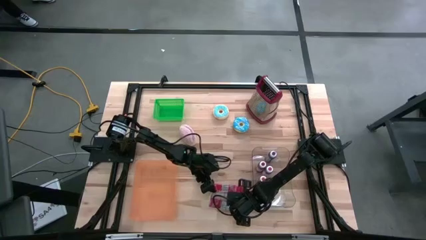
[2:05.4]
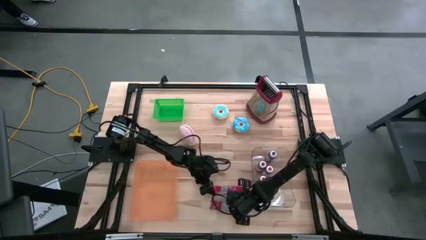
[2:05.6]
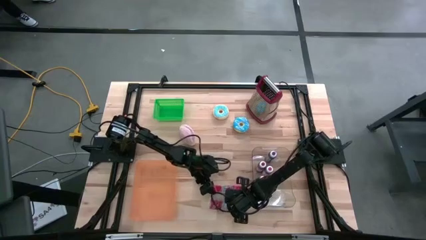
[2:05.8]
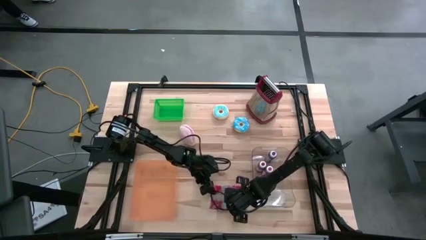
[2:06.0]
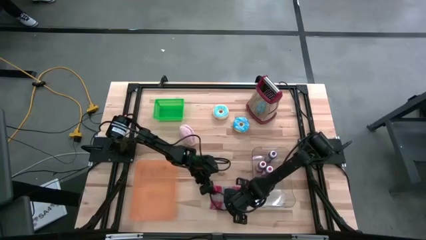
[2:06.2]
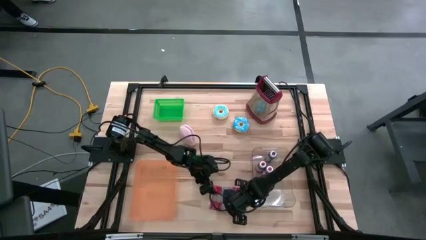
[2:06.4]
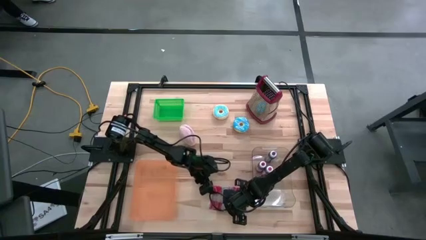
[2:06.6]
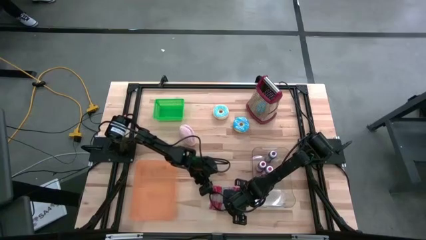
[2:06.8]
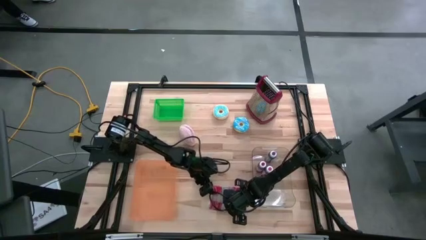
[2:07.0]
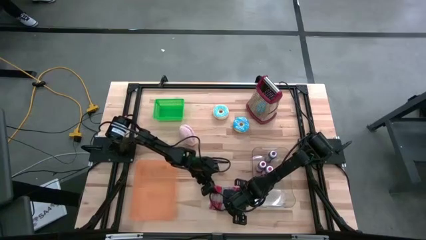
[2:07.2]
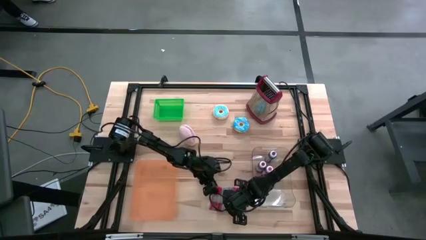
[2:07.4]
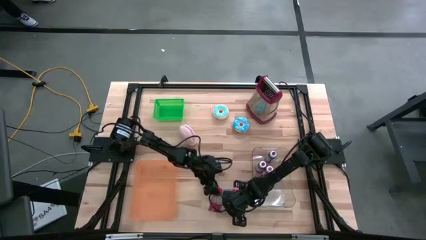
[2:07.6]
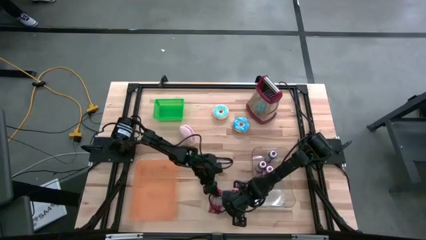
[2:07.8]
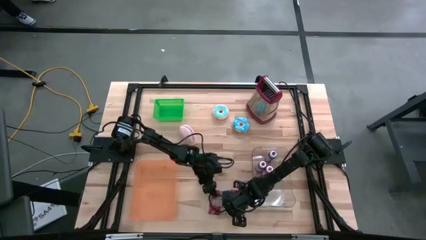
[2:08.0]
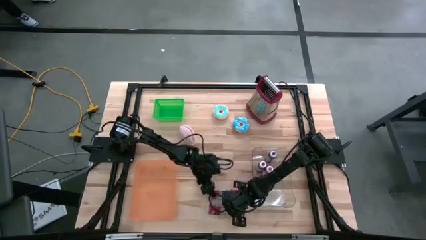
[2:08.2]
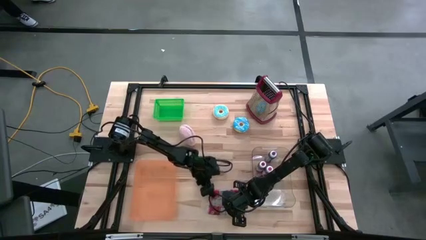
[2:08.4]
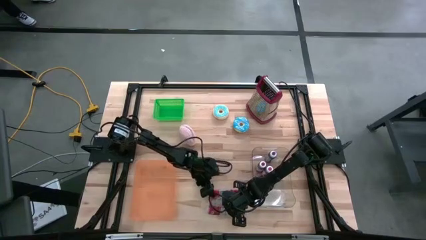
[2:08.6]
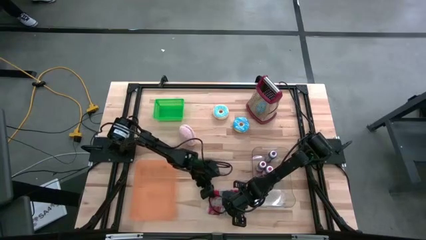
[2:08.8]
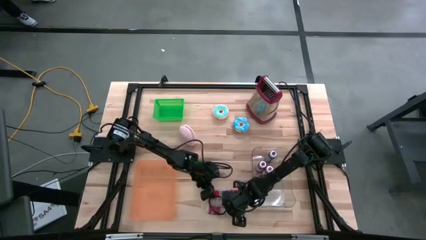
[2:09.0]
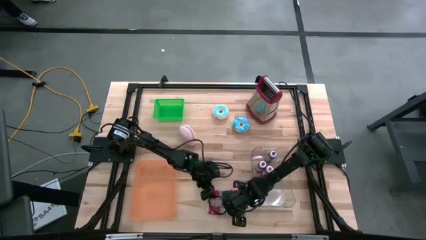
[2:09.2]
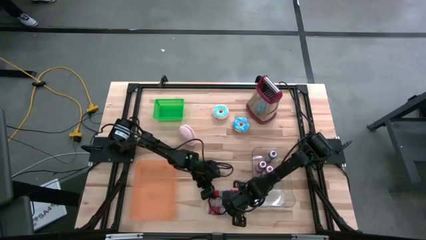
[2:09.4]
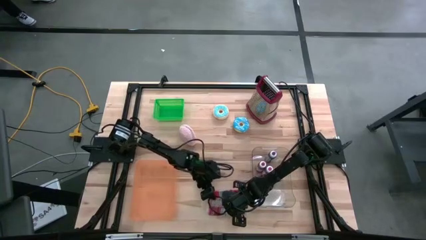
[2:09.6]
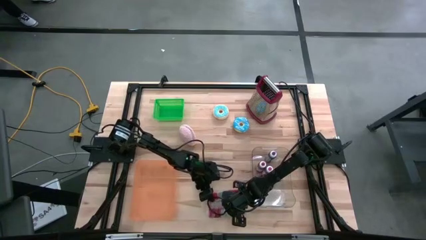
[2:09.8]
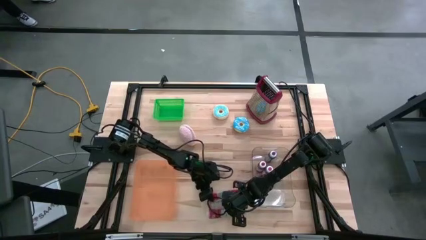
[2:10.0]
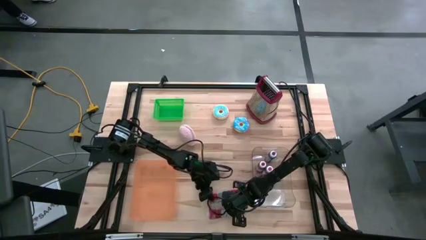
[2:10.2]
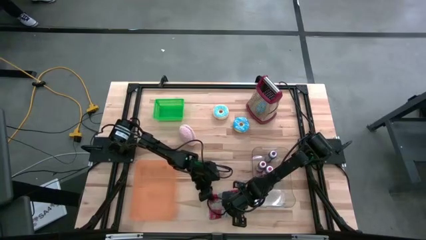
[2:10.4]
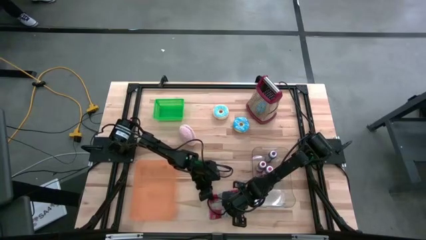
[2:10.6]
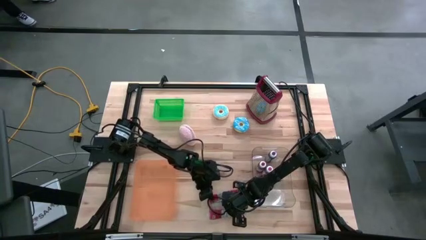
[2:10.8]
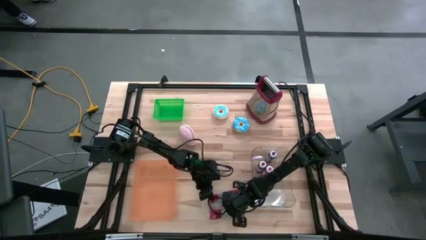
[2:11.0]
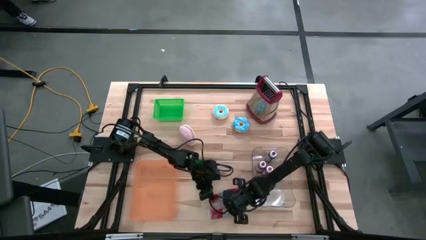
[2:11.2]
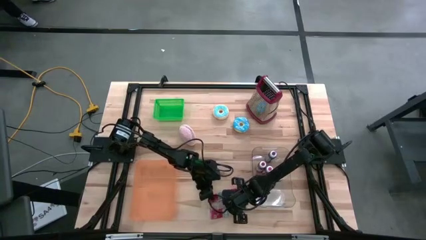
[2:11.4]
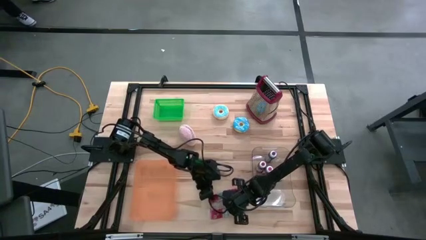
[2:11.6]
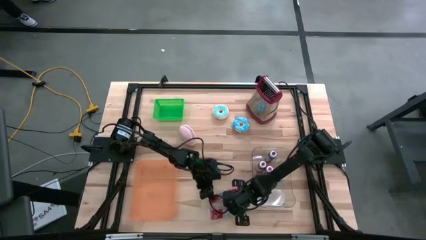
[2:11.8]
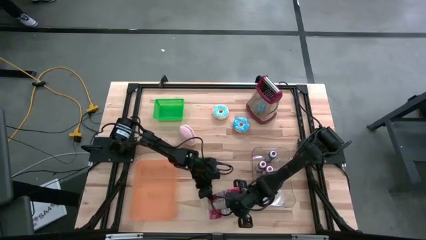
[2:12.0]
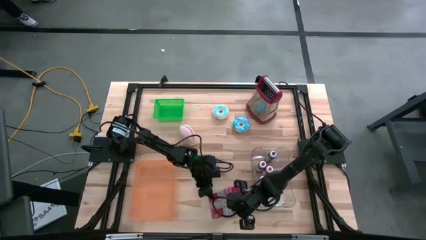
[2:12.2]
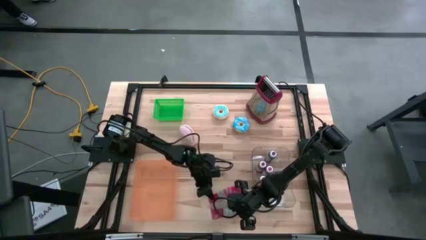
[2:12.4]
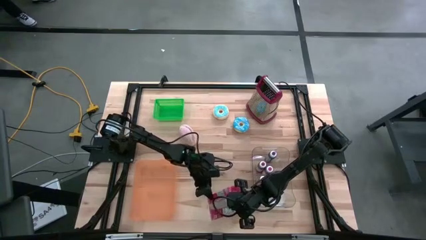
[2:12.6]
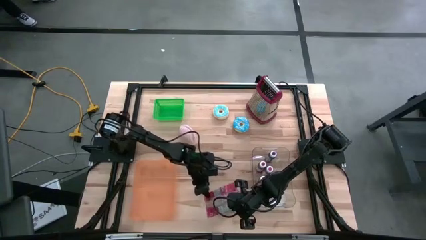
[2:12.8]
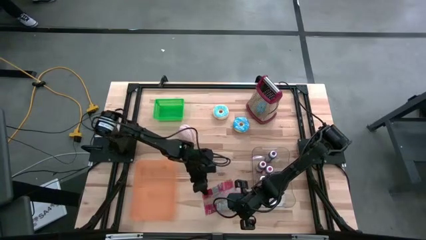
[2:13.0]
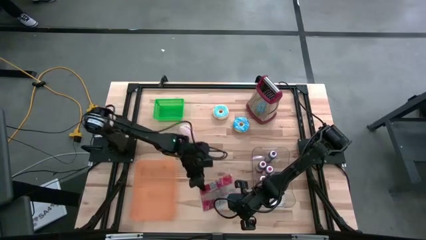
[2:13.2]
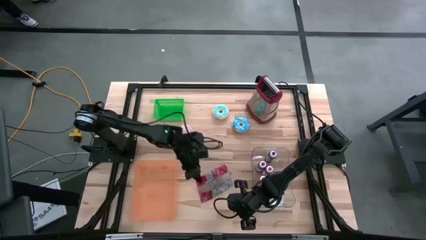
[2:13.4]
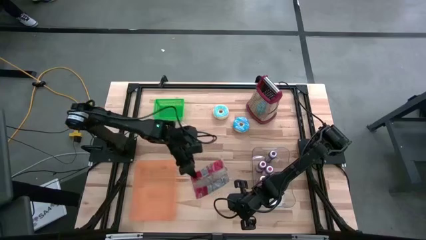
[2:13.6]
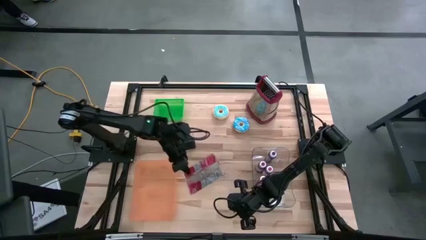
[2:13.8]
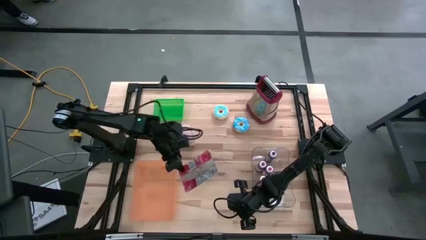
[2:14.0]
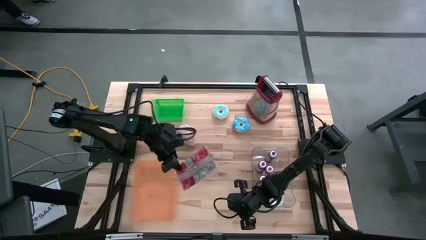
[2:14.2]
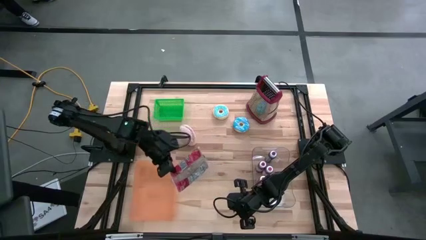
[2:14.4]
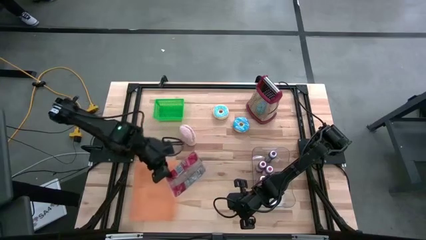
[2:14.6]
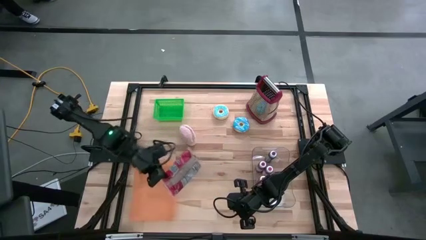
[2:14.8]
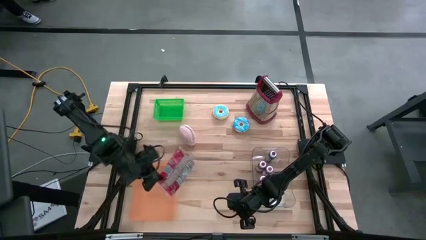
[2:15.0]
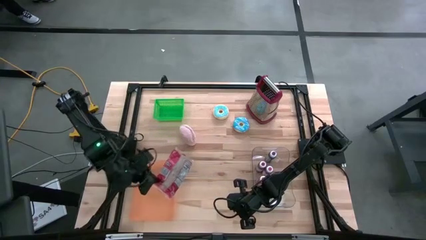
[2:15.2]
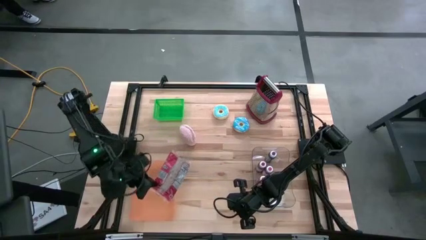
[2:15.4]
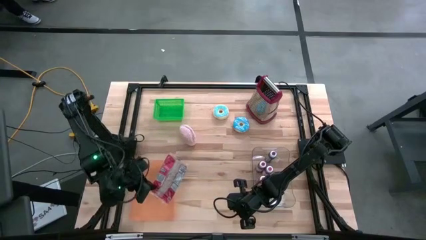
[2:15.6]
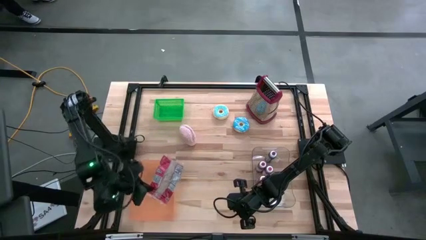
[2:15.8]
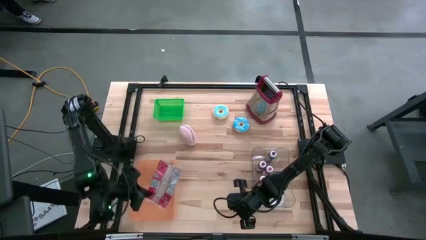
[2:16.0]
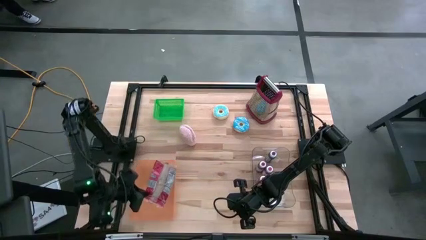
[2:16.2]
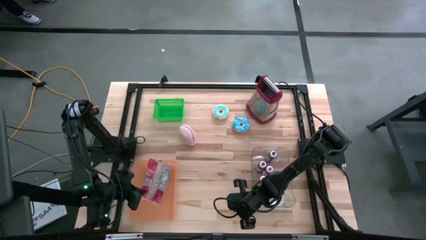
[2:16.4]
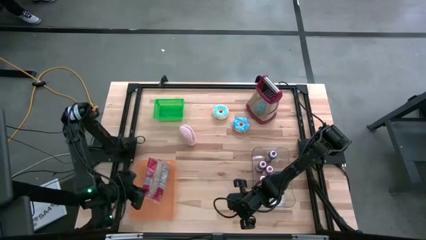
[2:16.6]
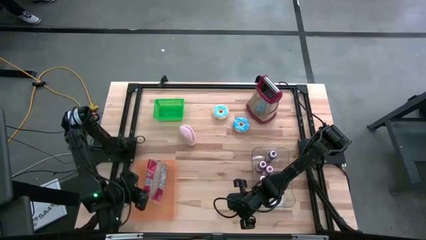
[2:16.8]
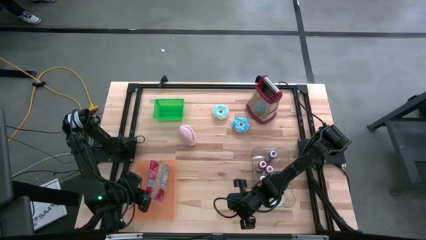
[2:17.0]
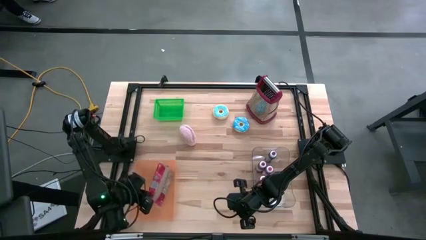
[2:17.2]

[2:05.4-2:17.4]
Put the red popcorn bag into the orange bin

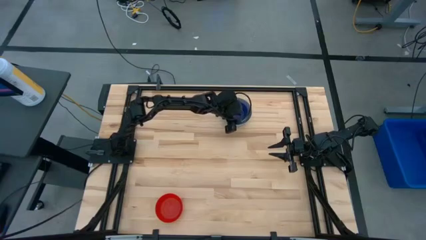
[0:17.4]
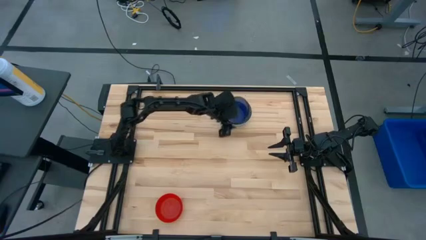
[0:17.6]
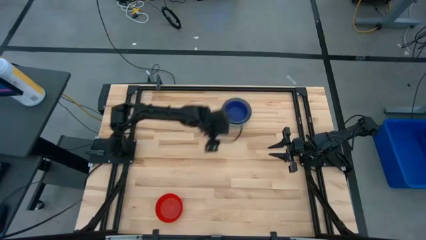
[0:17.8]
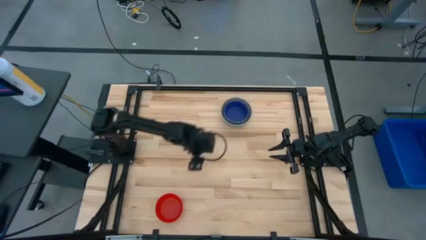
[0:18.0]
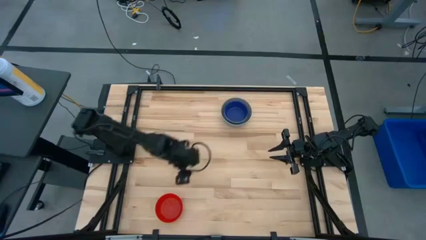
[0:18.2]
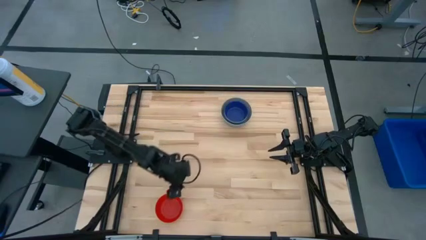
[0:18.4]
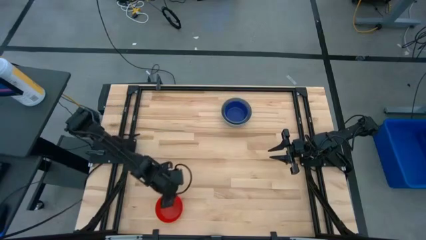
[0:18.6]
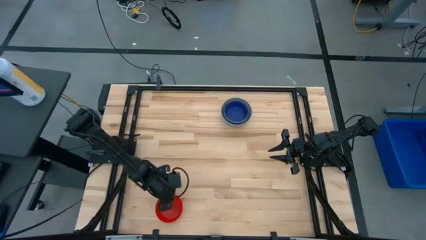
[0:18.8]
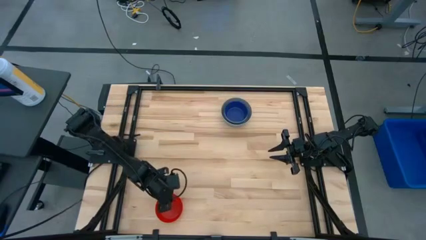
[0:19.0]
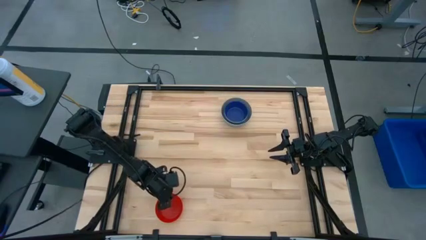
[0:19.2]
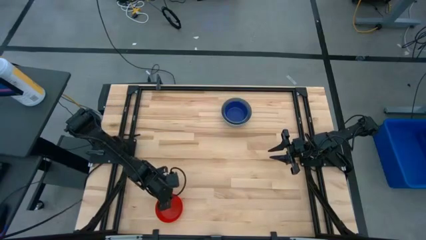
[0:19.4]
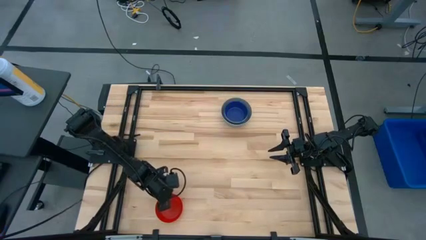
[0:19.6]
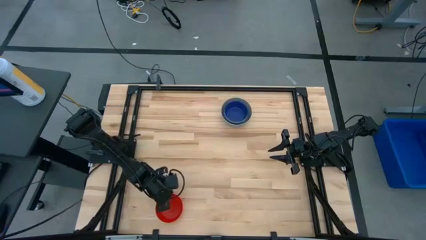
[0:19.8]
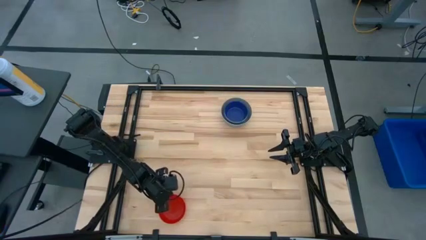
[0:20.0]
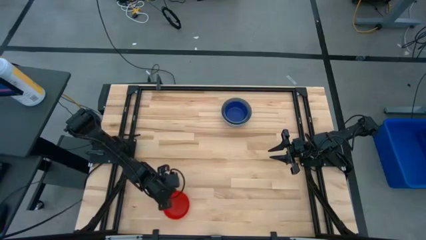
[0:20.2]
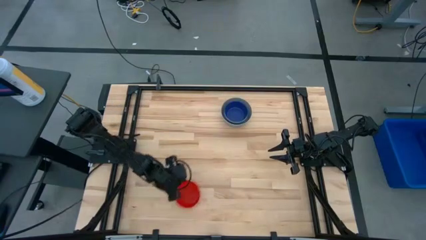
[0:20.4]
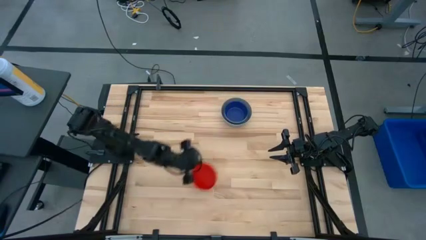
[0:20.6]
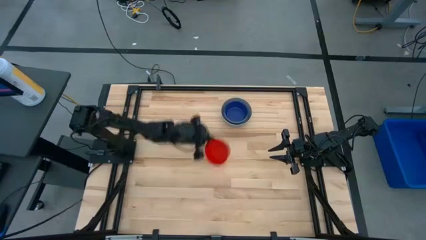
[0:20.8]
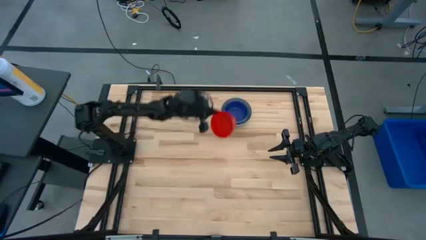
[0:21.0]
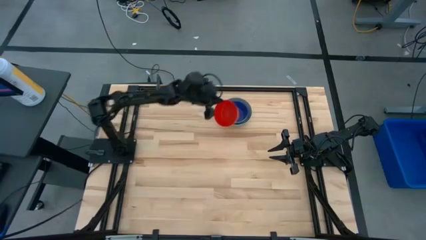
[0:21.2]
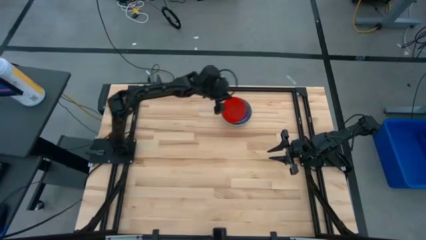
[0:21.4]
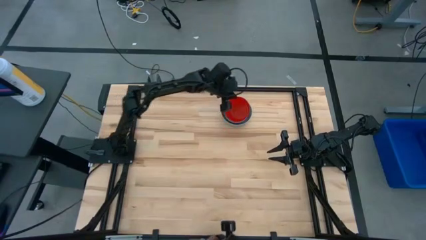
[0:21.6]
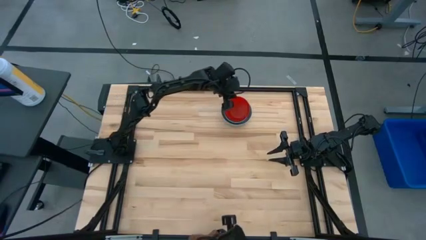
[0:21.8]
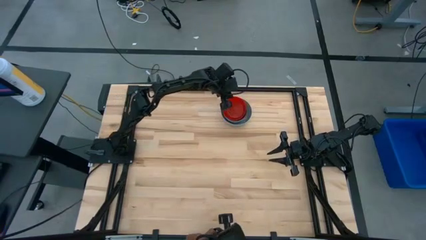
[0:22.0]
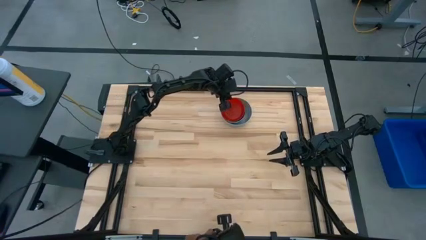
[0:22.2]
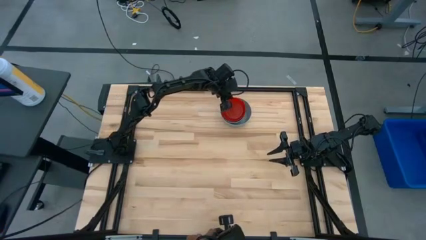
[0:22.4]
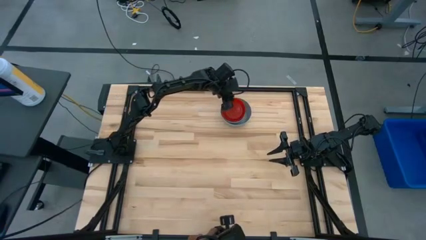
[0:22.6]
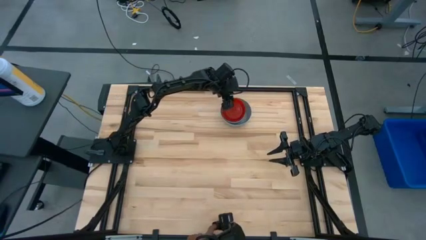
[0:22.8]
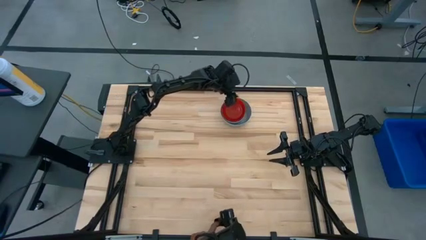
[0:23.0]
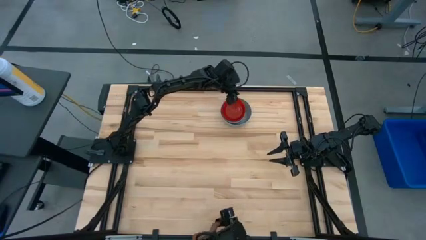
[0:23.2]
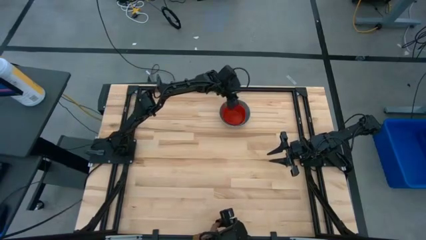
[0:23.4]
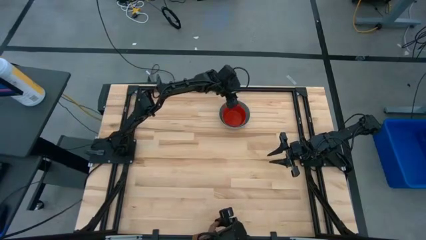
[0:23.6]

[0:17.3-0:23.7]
Stack the red bowl on top of the dark blue bowl
